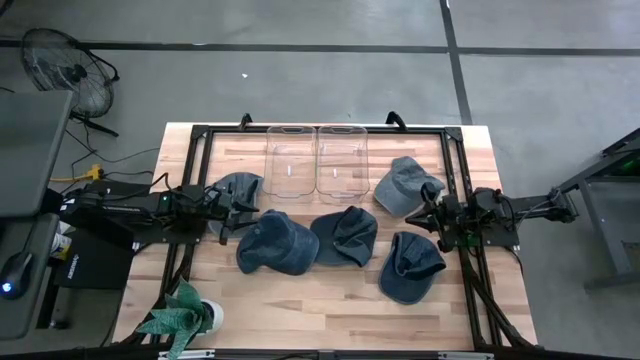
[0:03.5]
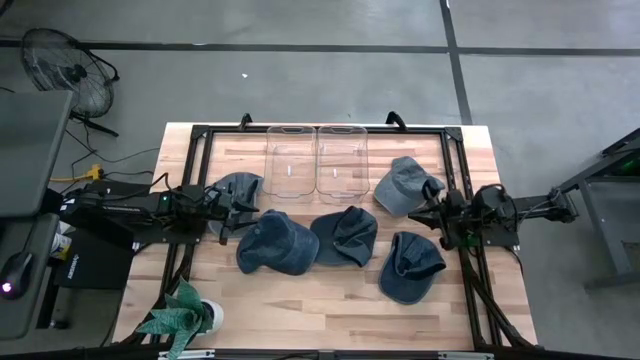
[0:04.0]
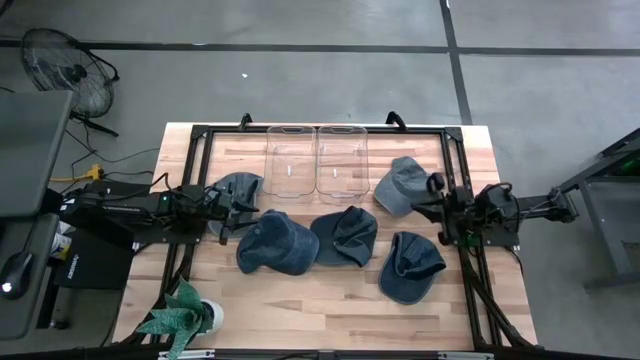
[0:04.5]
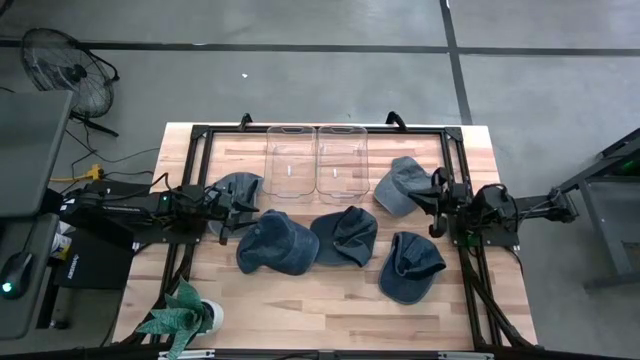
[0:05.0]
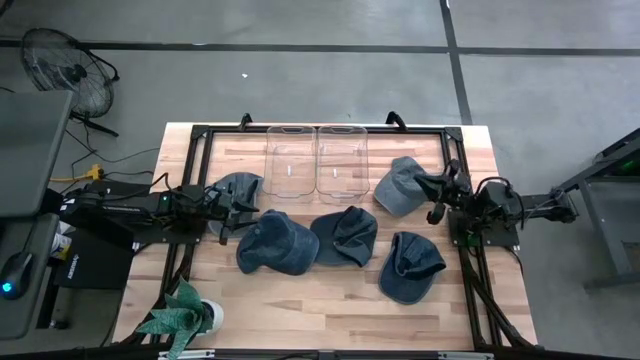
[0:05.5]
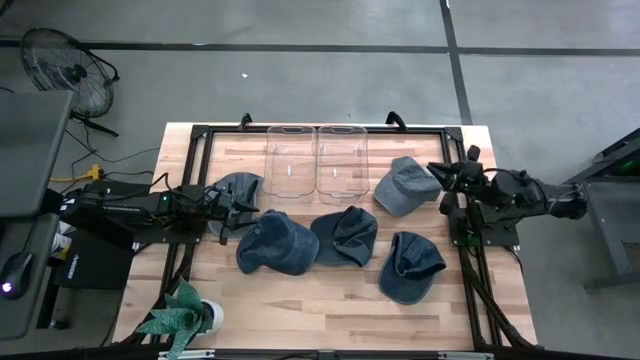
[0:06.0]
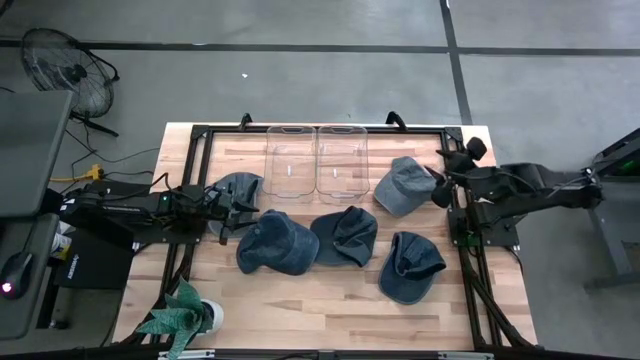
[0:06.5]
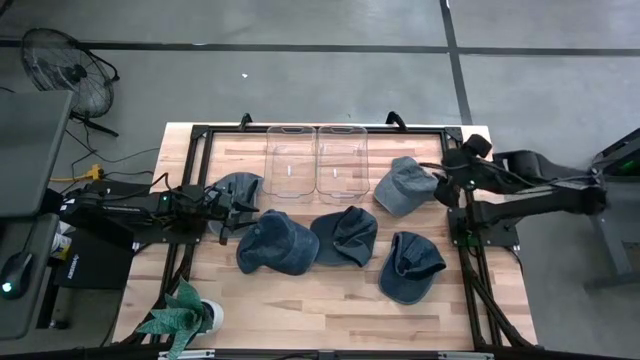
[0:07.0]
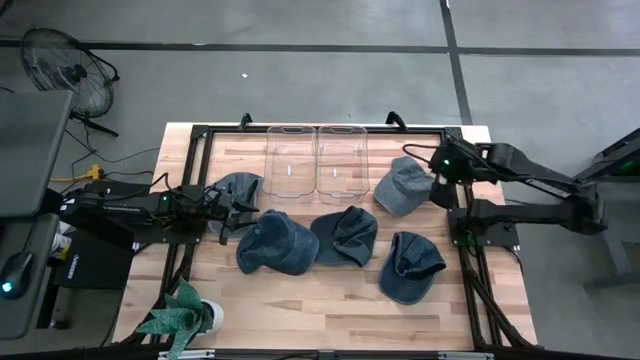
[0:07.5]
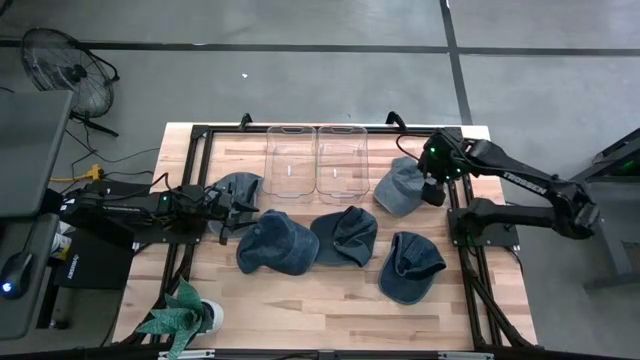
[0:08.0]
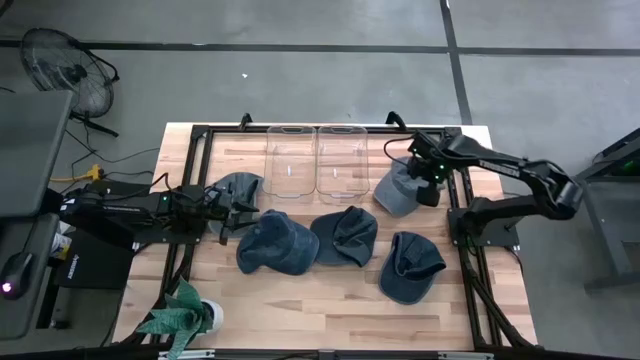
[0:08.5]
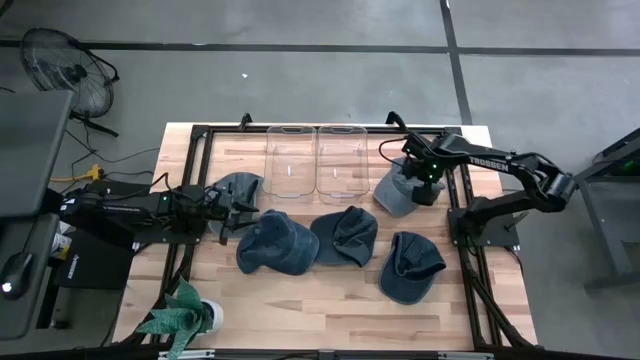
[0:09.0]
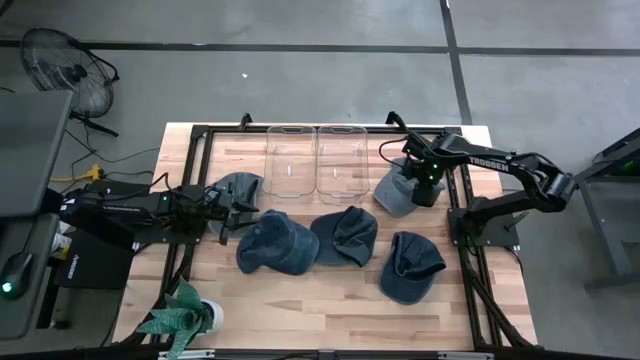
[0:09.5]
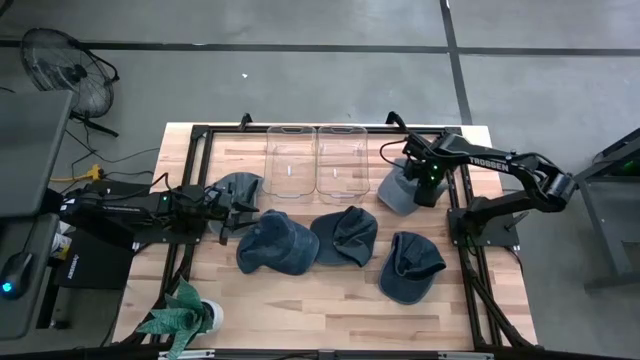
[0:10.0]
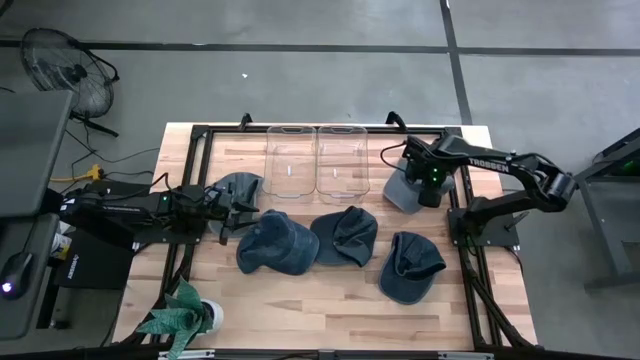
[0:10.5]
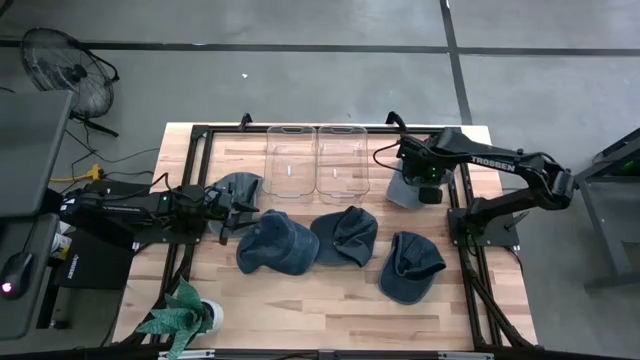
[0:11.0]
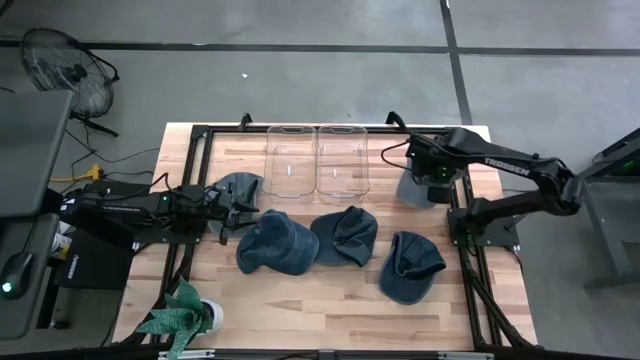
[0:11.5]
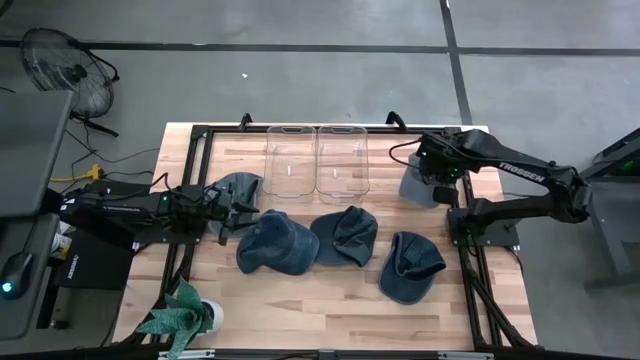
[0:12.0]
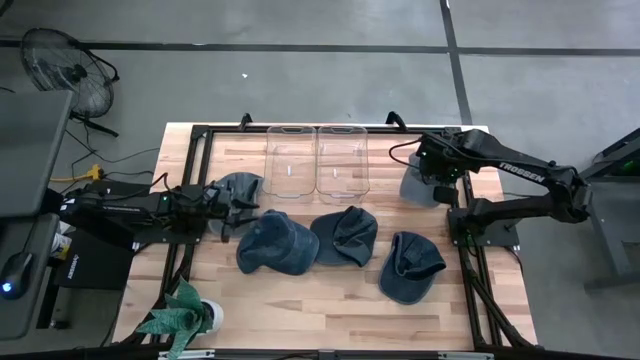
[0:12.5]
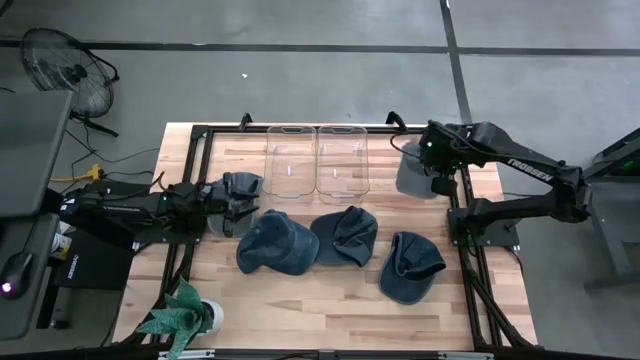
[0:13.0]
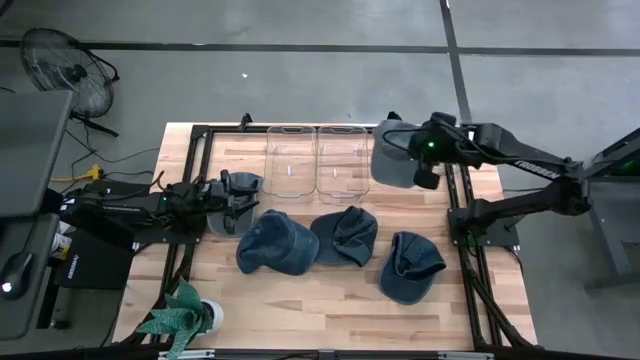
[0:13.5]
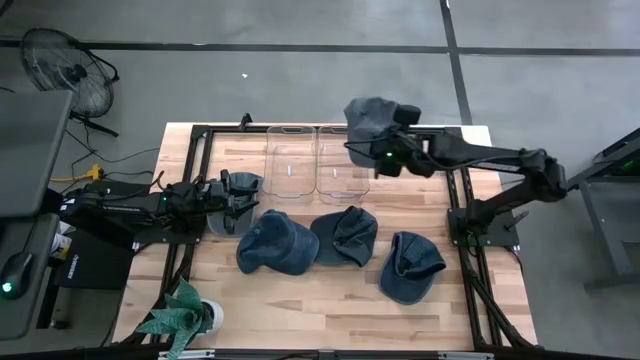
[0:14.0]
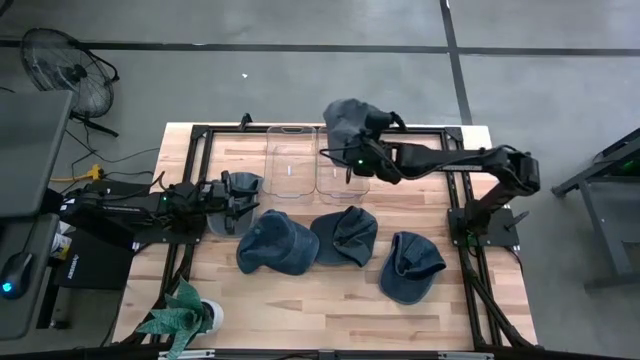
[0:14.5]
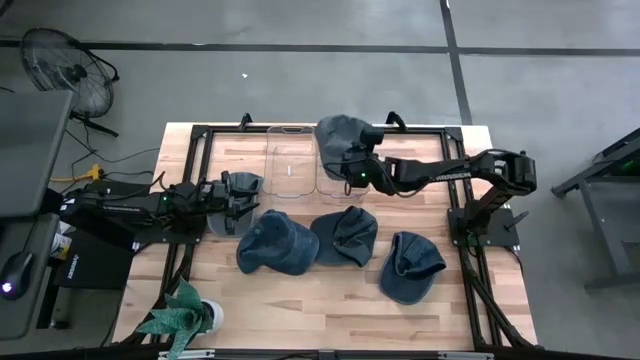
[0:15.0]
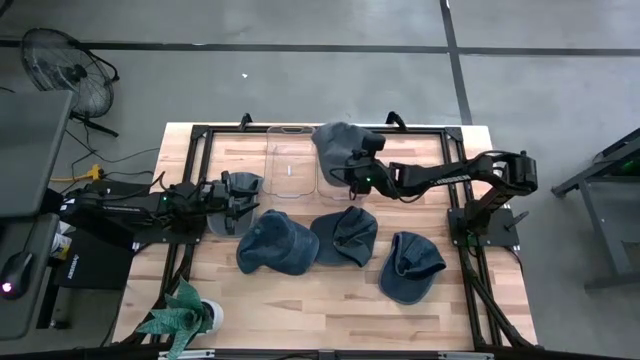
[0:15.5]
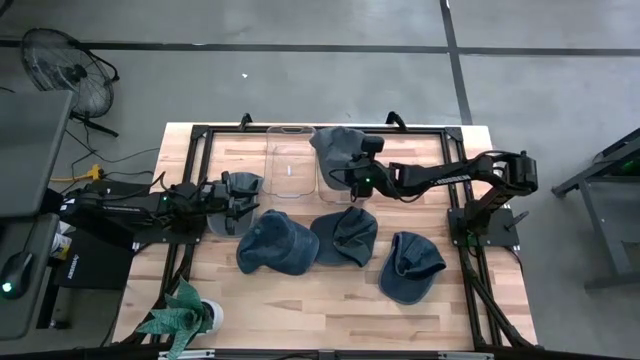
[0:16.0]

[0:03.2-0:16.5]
Task: Pick & Place hat
Put the right gray cap into the right transparent bin

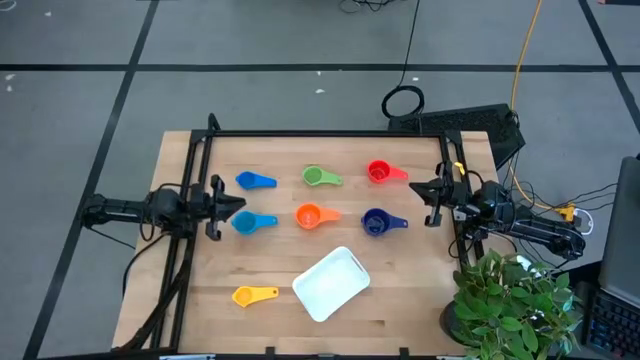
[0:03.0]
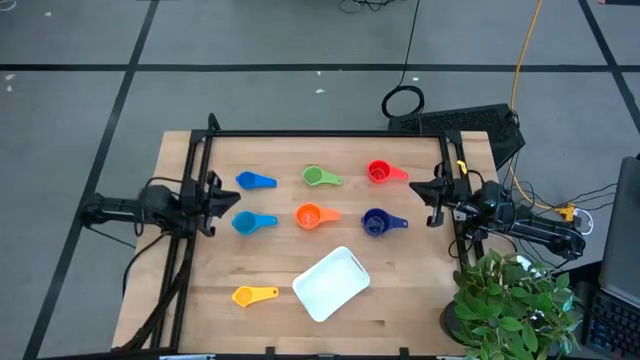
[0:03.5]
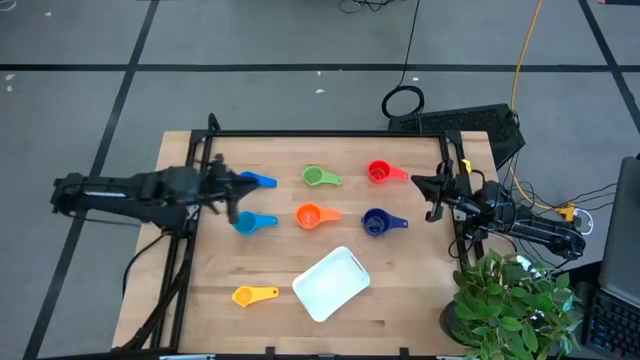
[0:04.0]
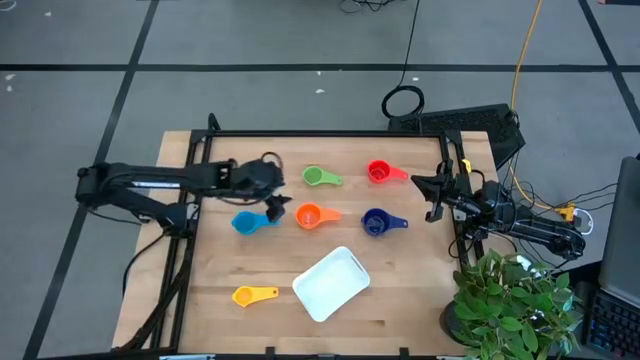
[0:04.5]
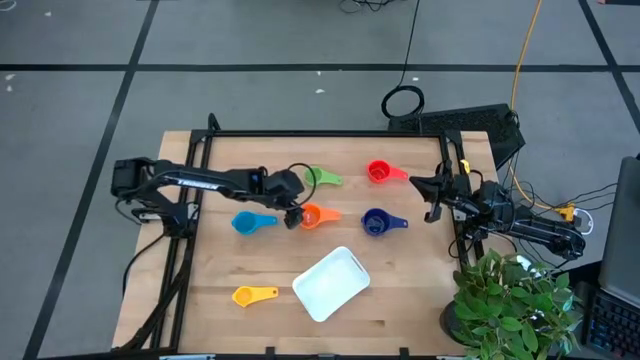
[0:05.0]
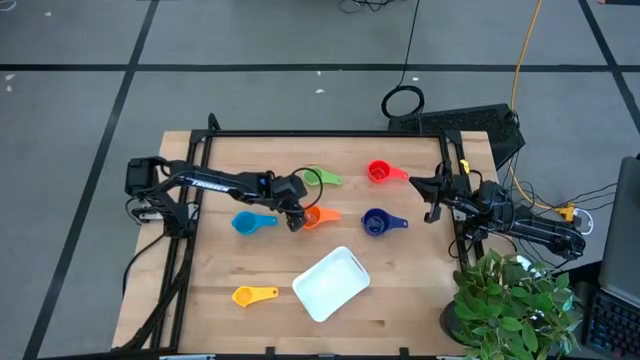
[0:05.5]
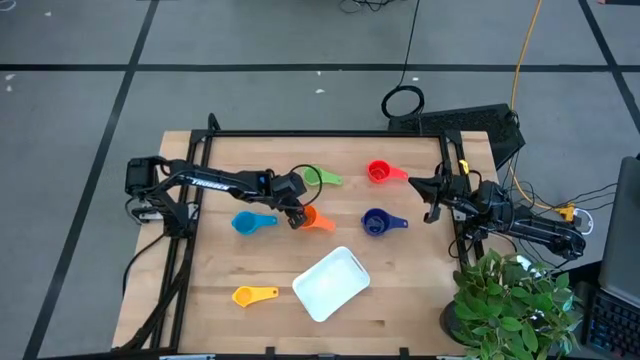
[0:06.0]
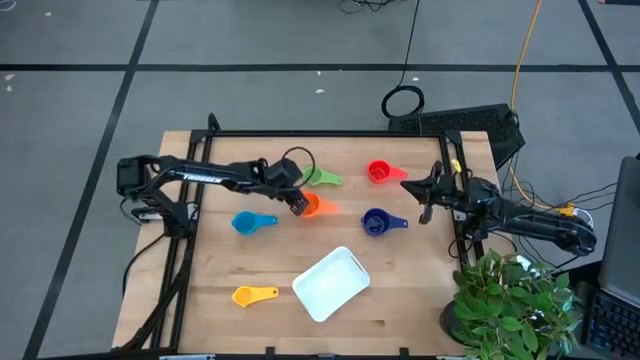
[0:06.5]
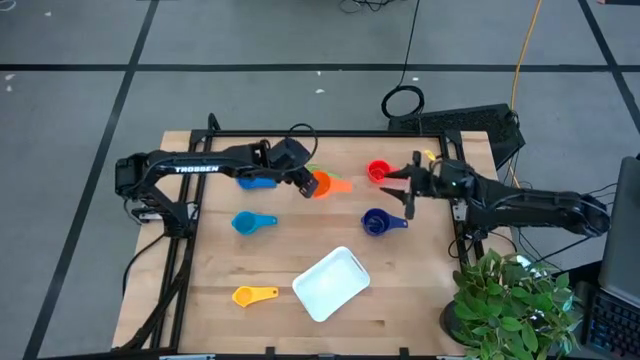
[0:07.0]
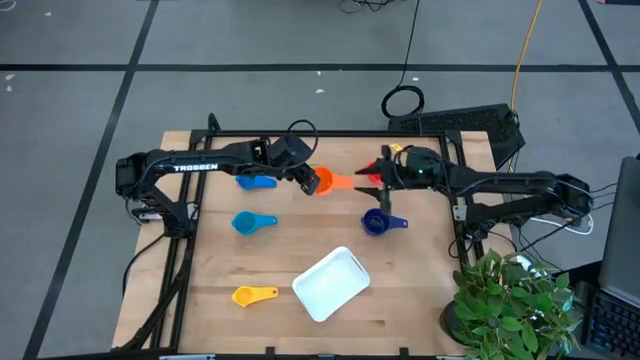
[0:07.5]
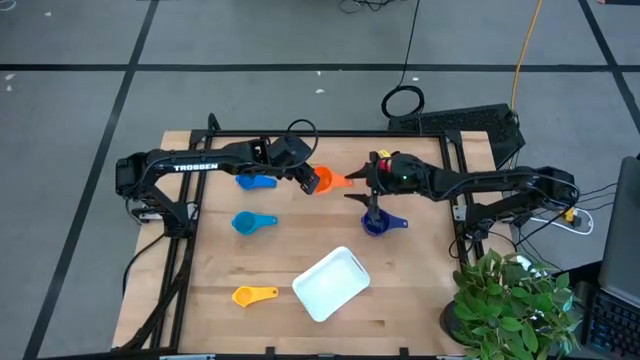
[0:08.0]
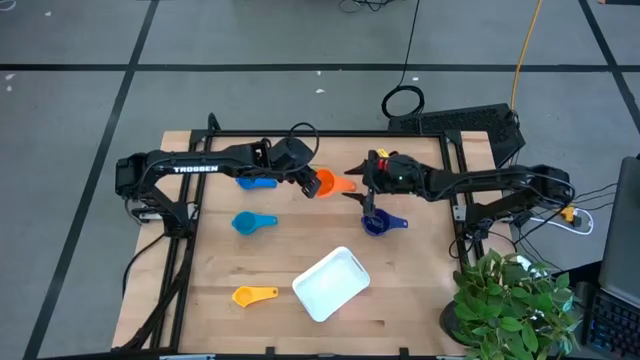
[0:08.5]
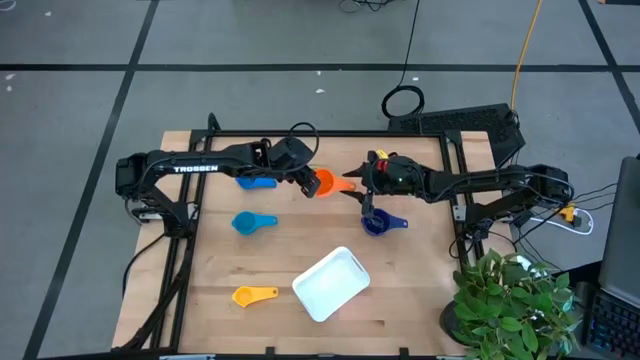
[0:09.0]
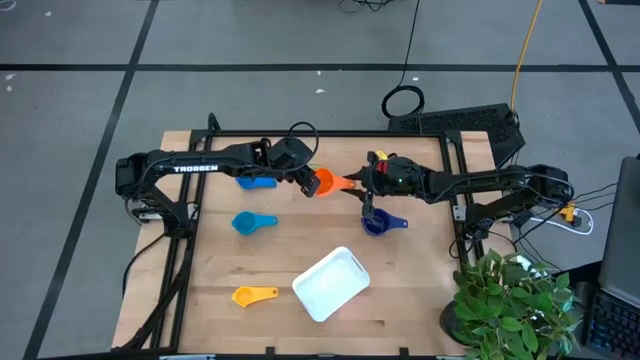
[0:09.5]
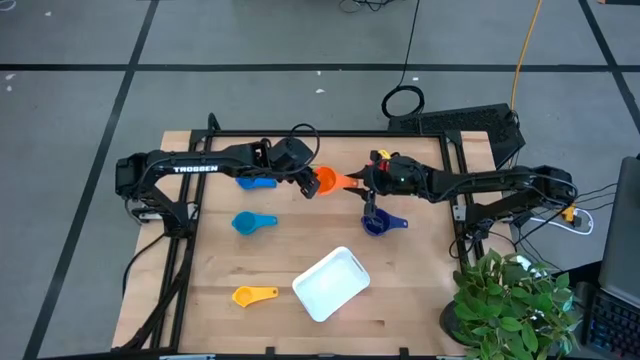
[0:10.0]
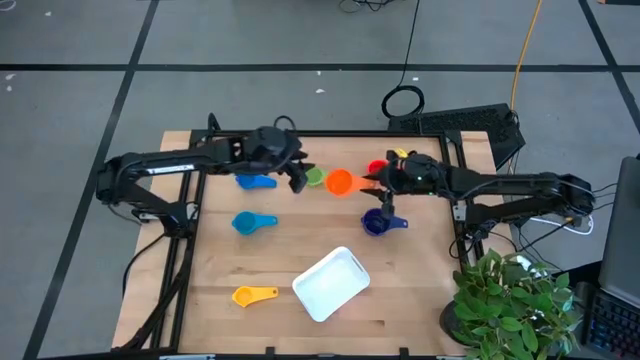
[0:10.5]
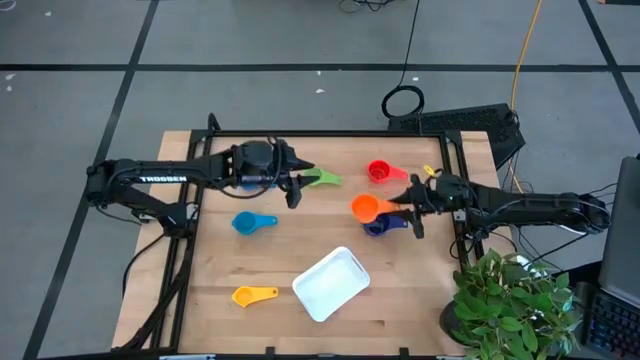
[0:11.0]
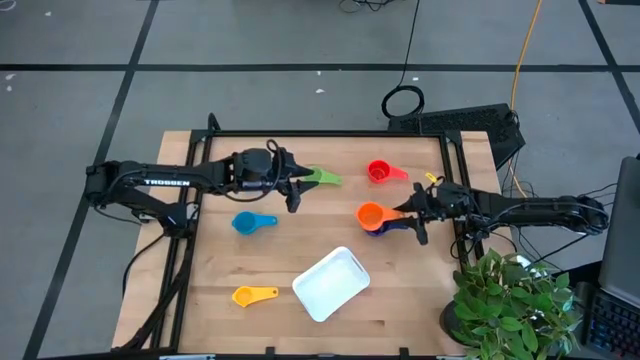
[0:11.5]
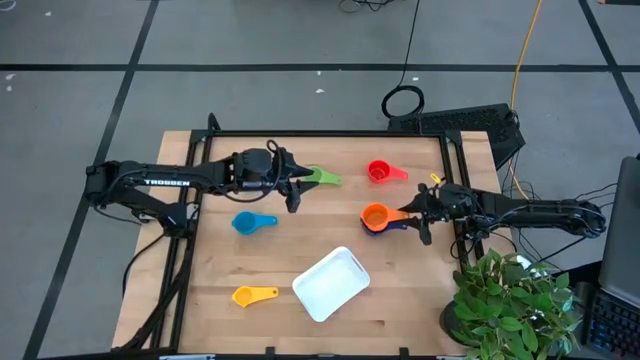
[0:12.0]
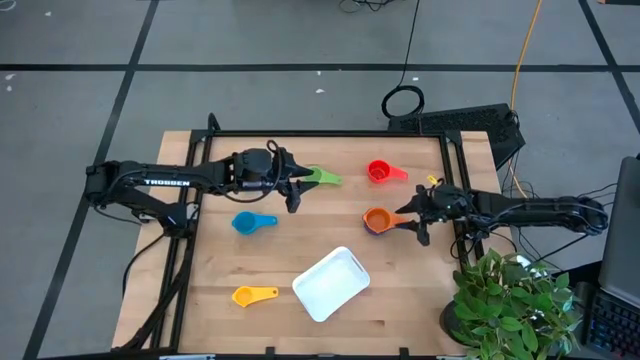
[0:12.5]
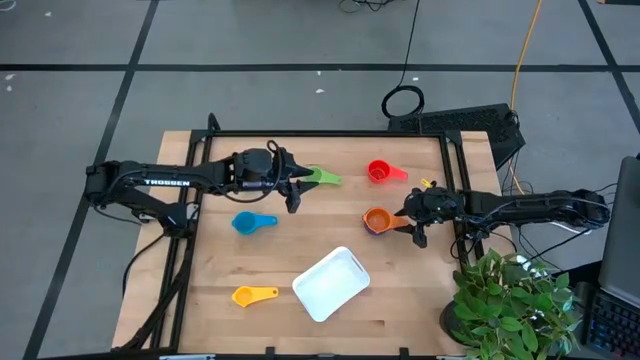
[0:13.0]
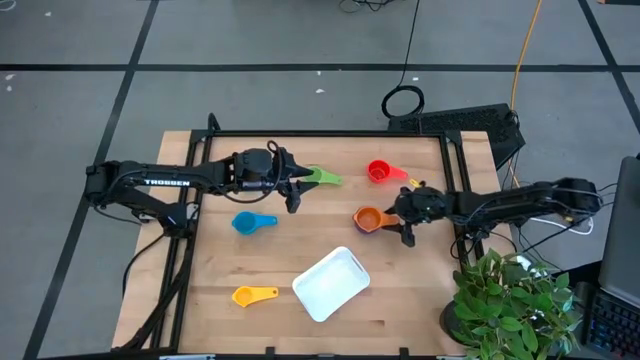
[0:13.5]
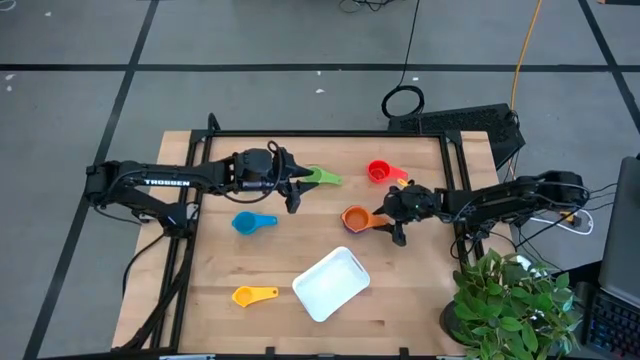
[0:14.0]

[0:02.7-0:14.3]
Task: Nest measuring cups in basket
Stack the orange measuring on top of the violet measuring cup
